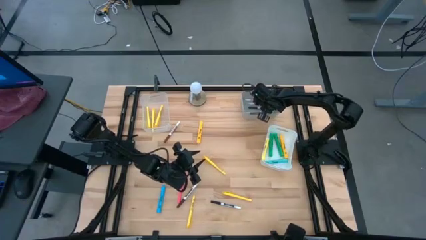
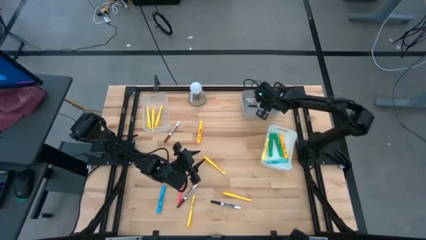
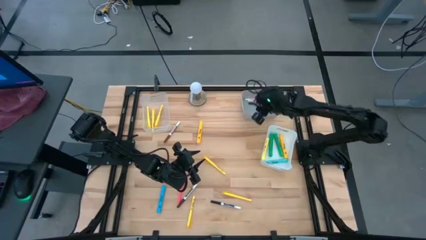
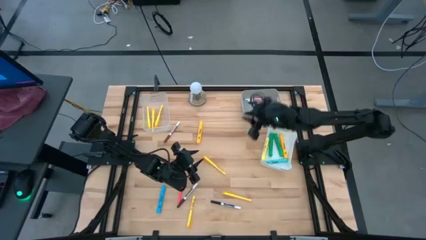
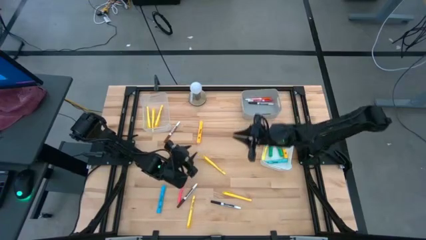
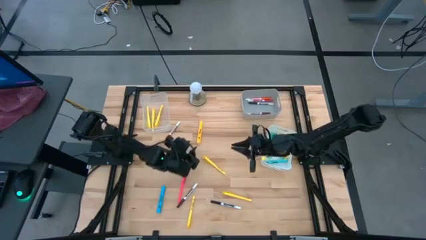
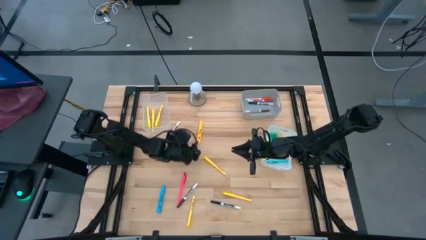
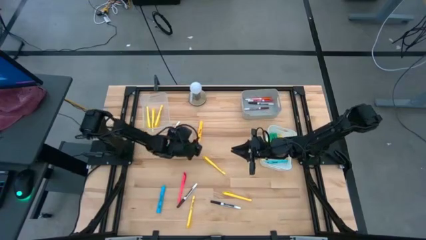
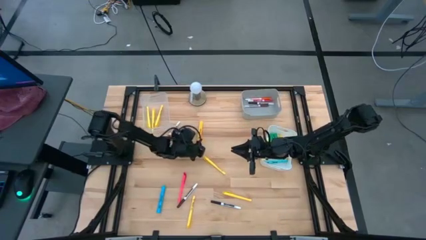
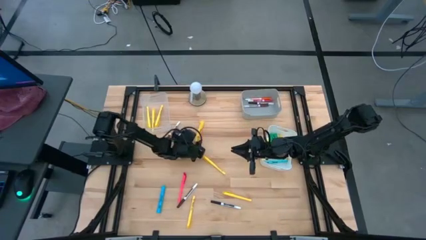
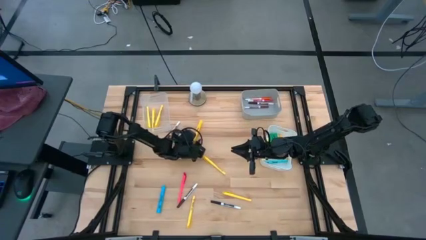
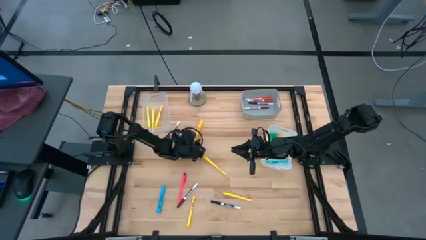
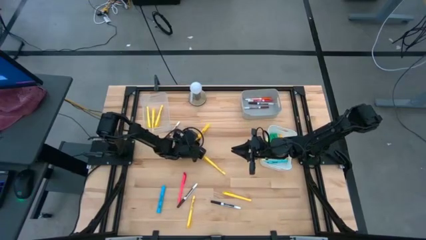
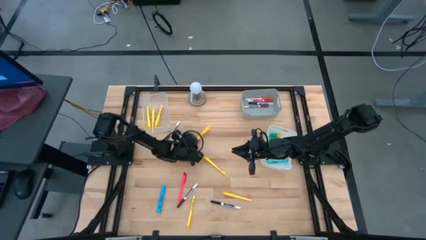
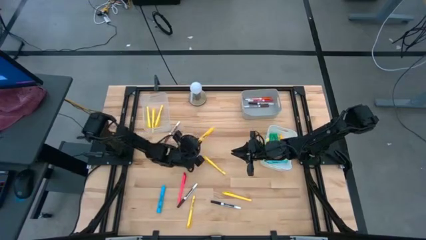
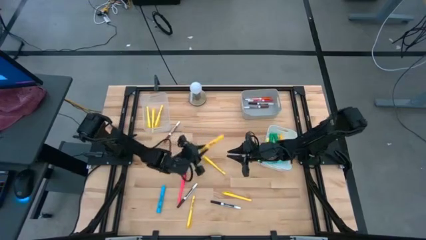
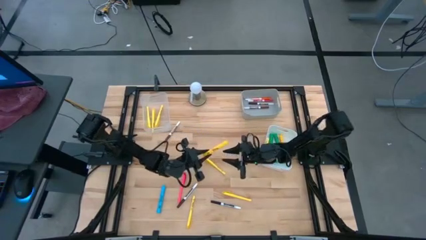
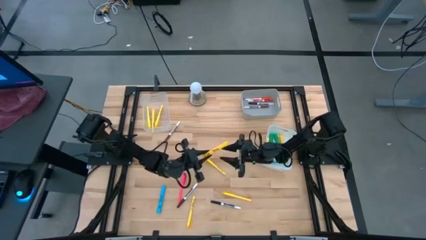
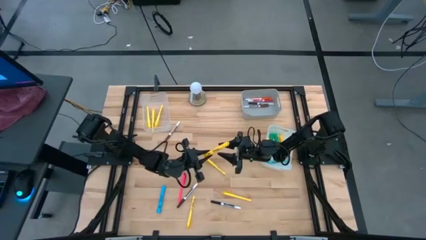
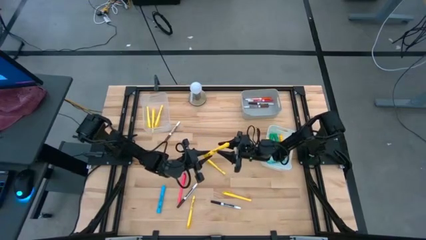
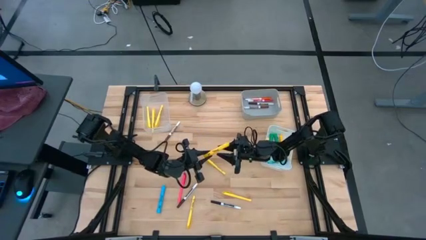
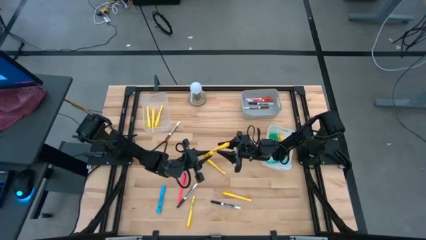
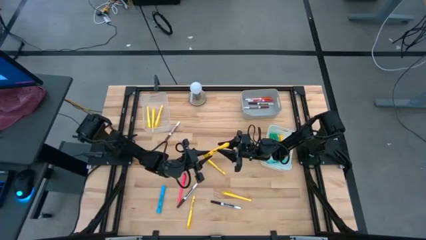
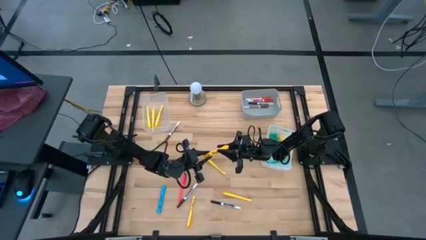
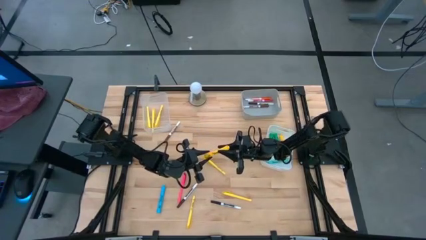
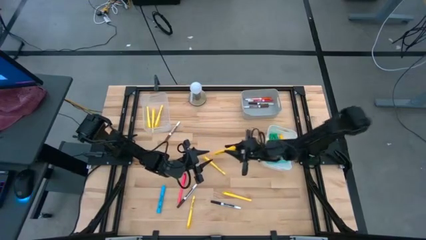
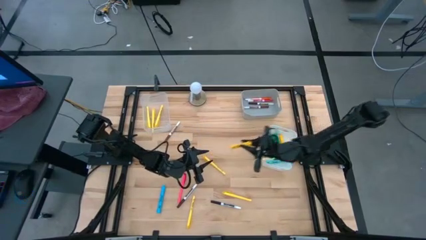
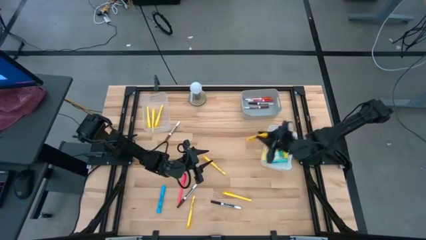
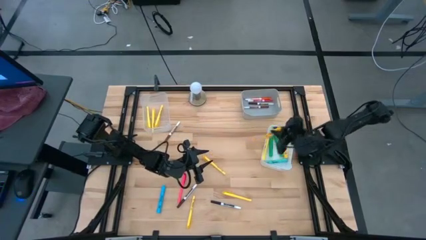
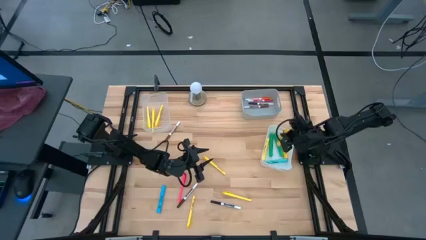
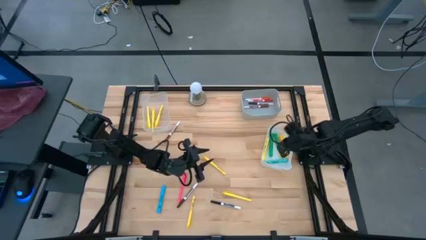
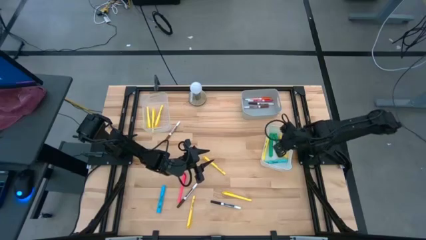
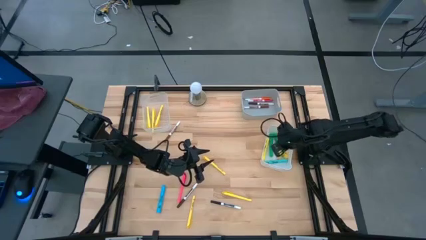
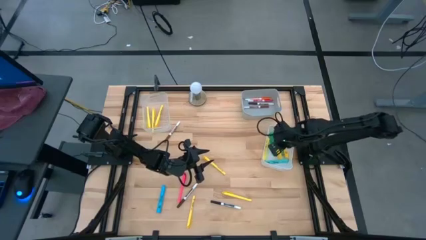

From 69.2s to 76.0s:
Task: Pick & Place Markers
Put the orange highlighter pen into the white bin

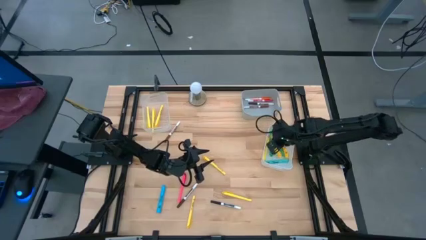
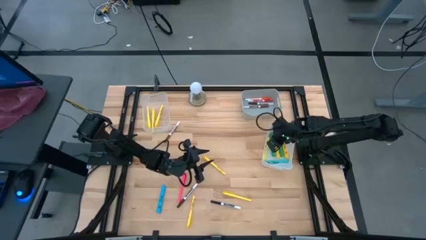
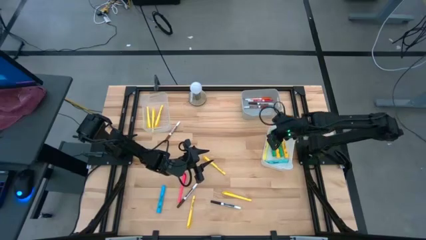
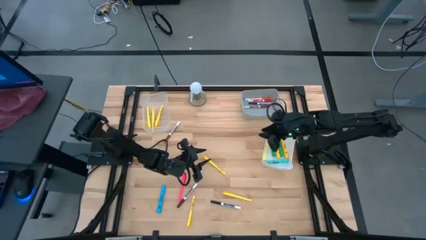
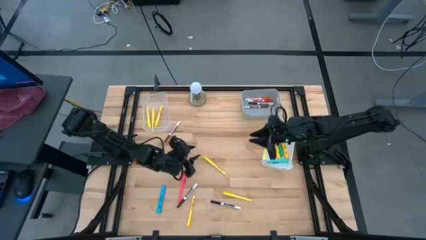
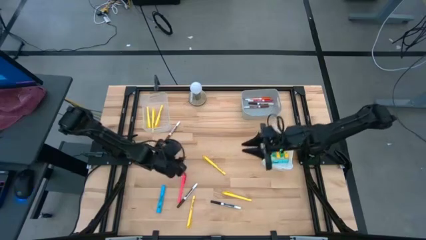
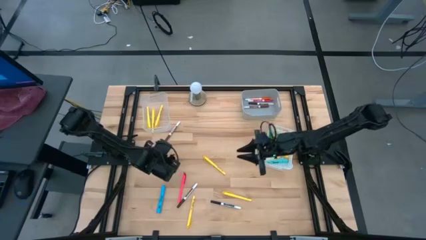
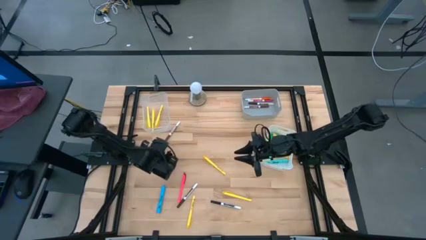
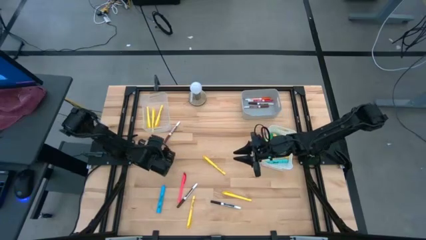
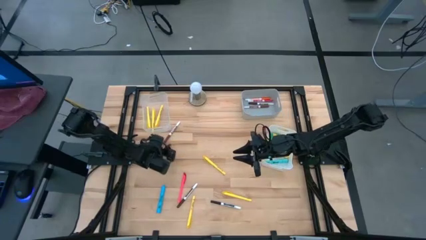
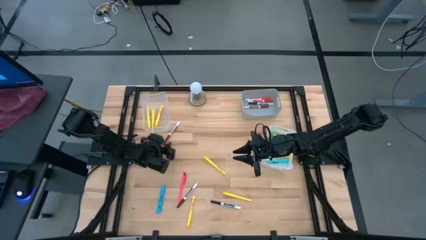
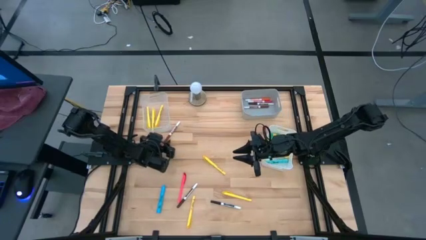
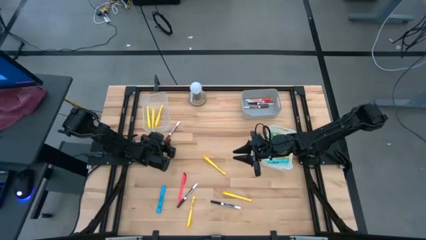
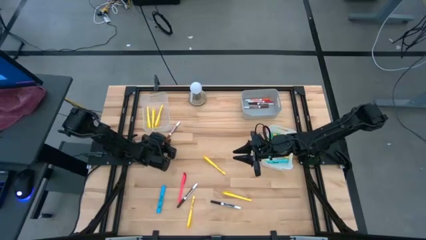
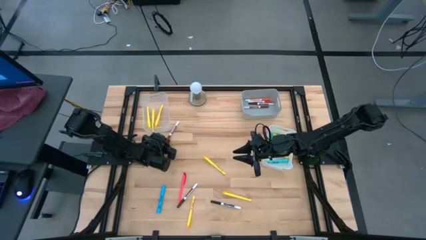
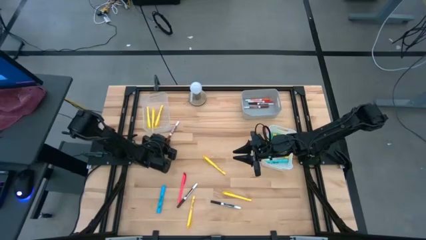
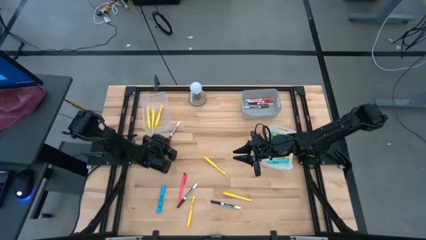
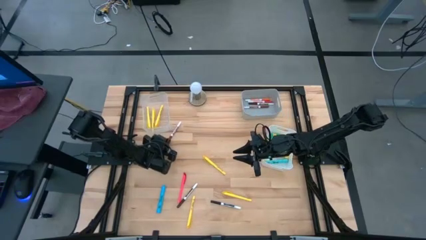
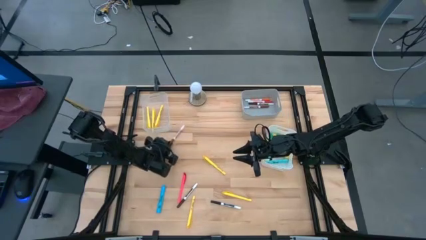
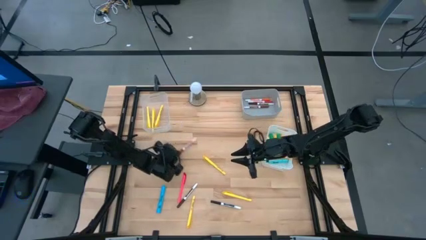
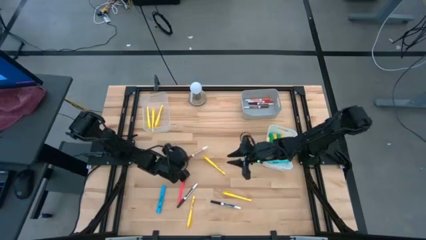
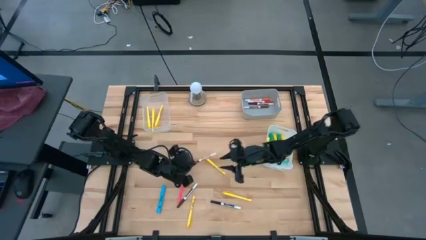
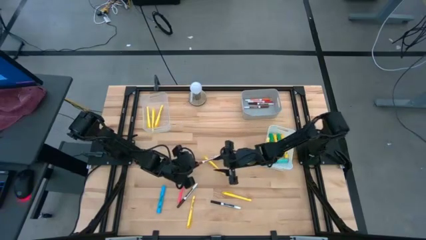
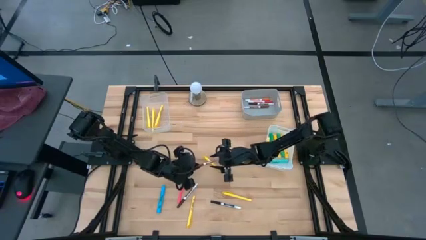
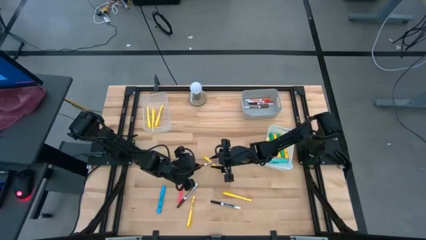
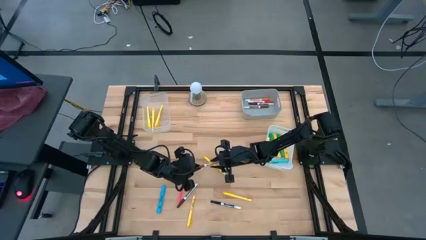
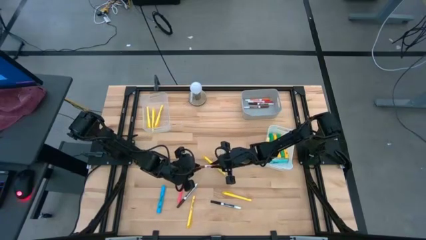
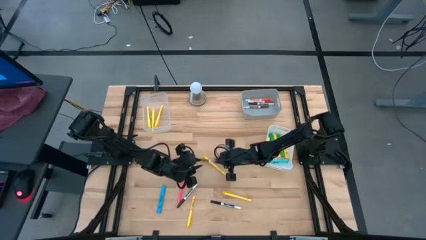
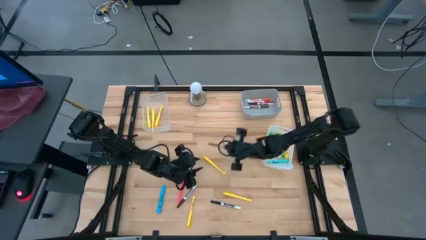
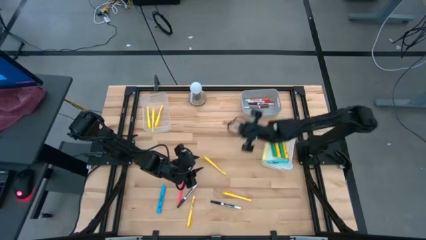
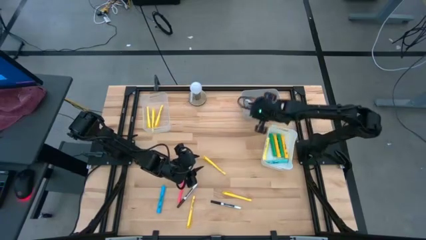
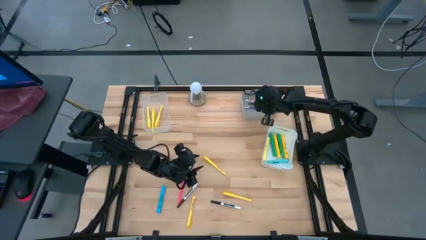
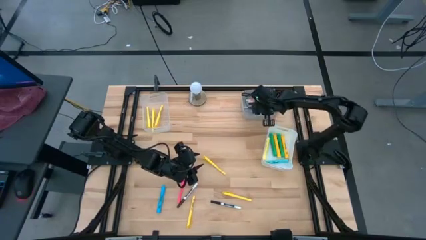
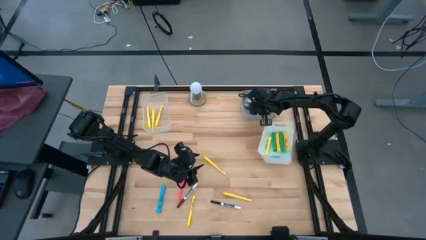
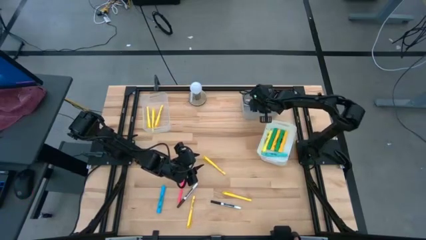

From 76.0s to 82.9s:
Put the light brown marker pen into the gray bin

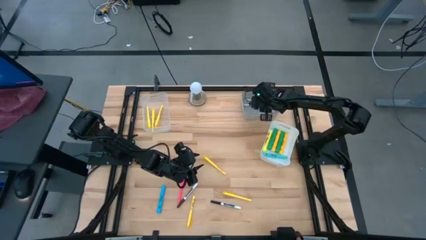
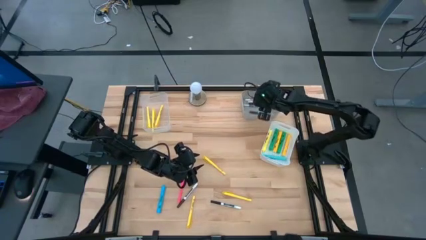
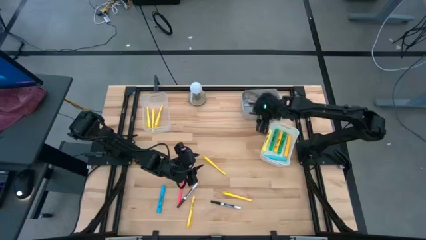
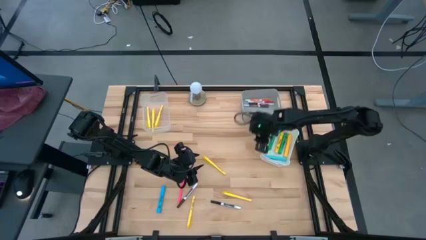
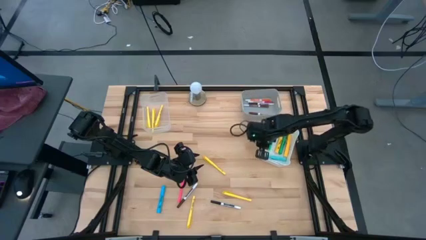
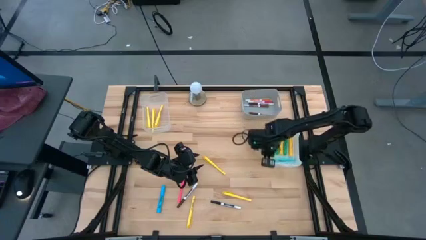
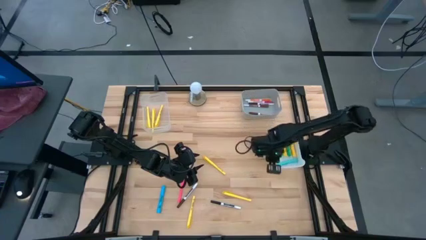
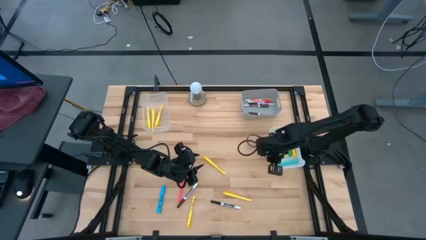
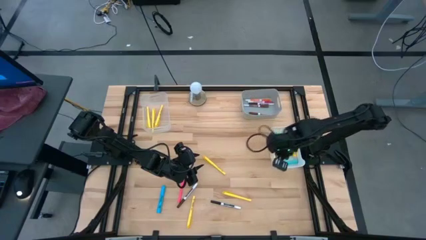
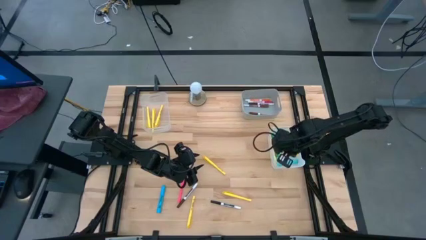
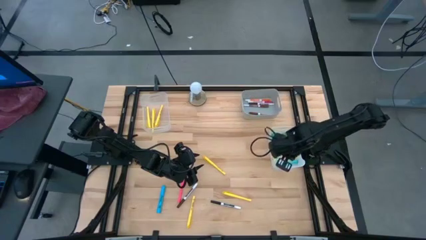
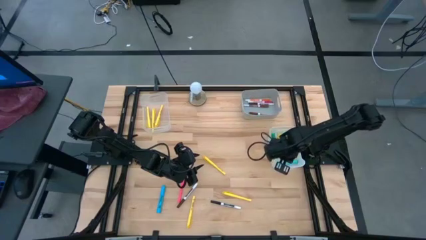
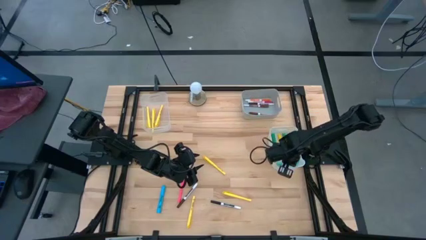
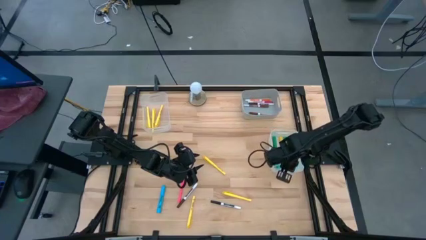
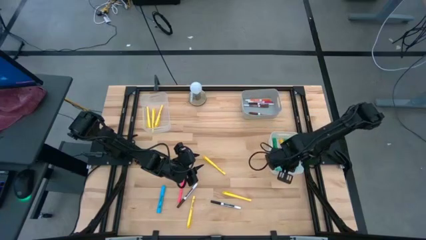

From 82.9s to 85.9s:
Adjust the white bin
